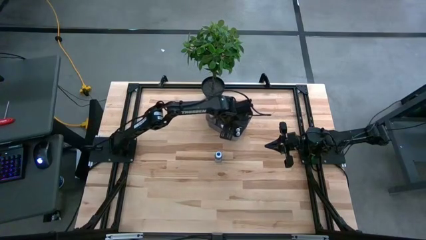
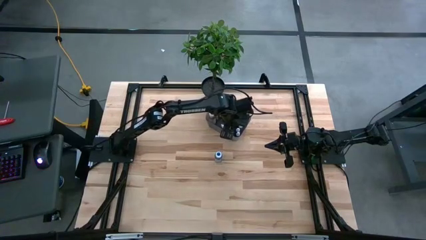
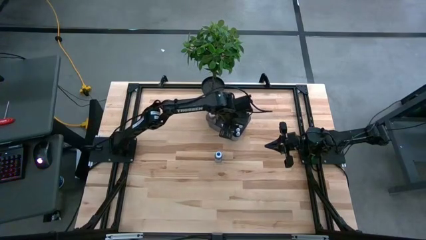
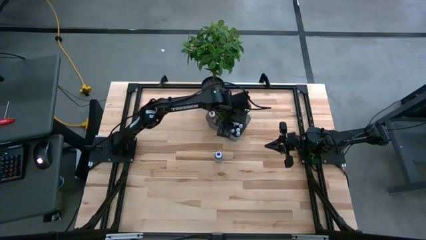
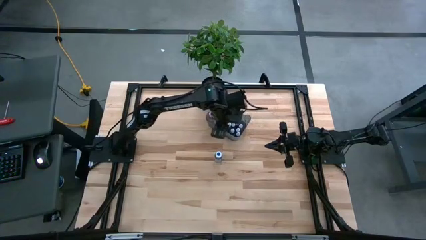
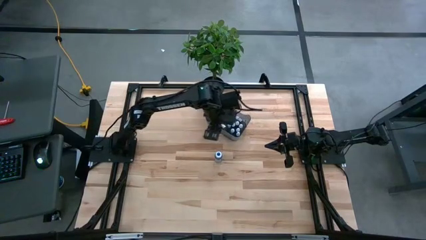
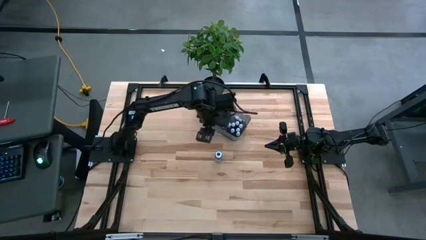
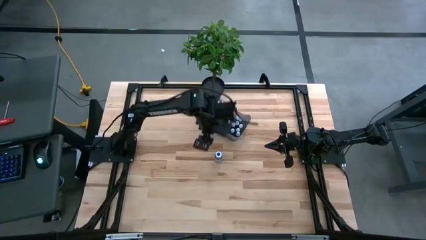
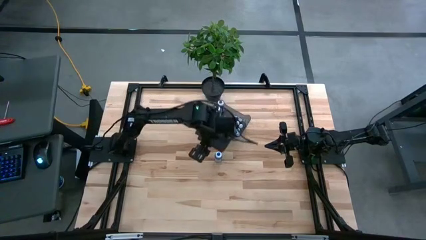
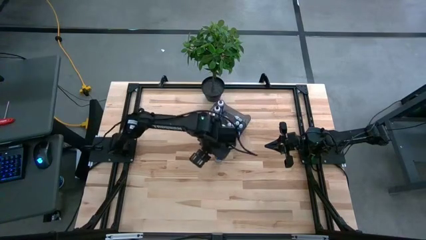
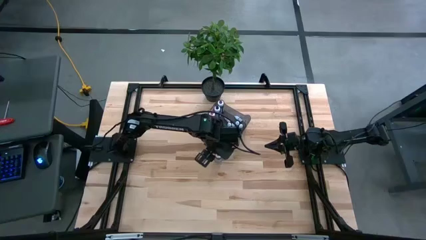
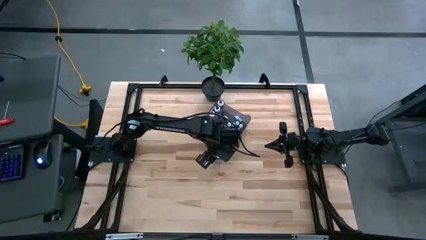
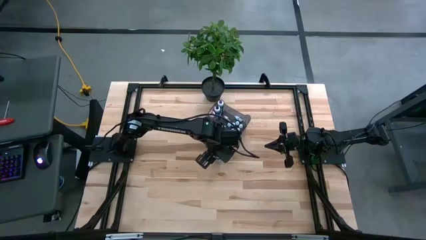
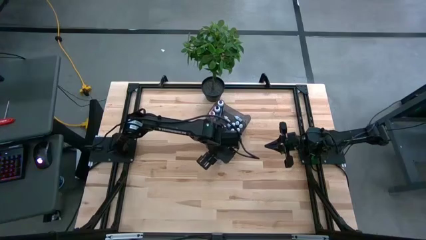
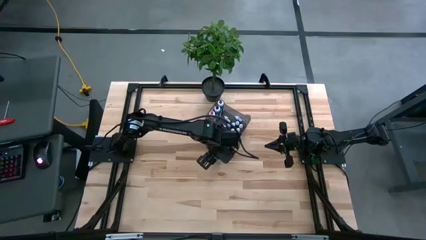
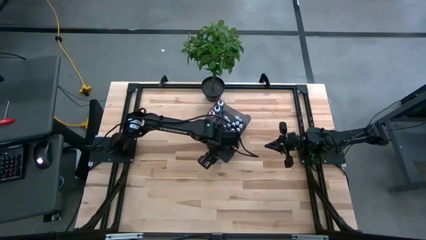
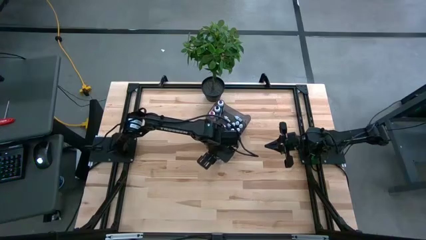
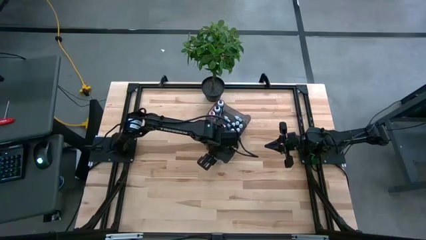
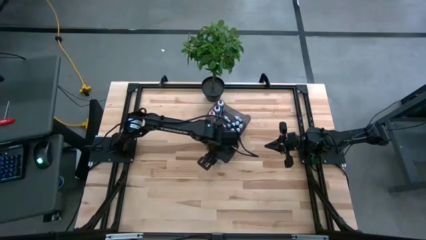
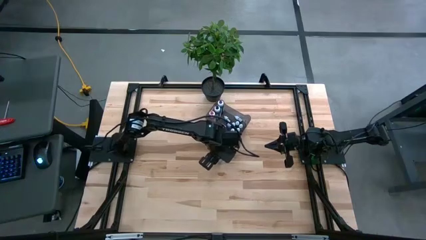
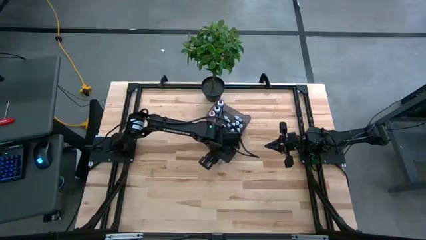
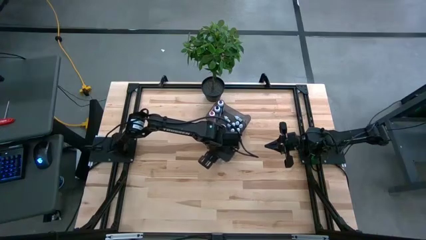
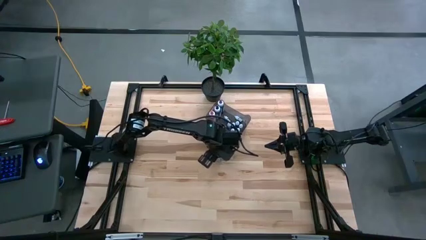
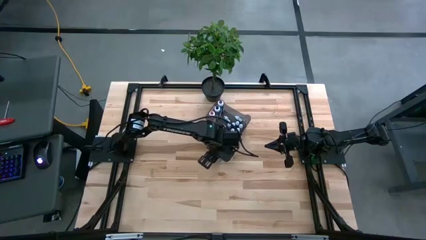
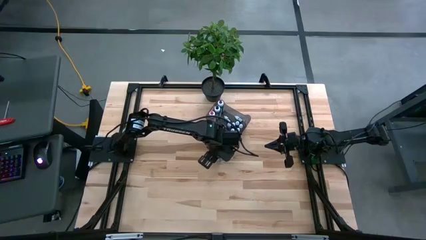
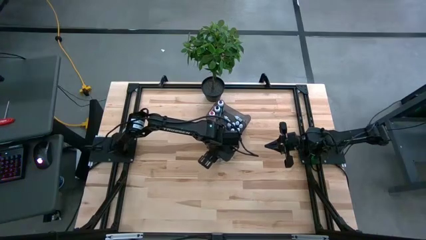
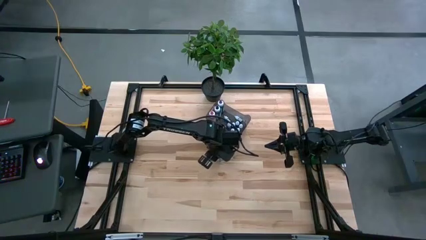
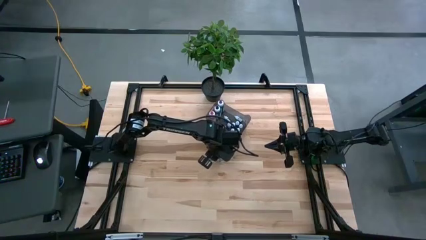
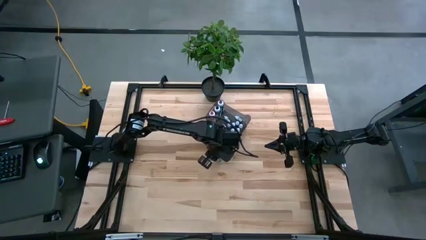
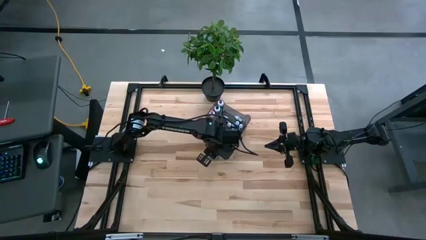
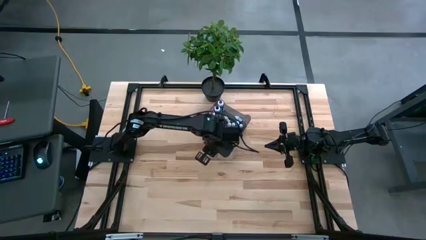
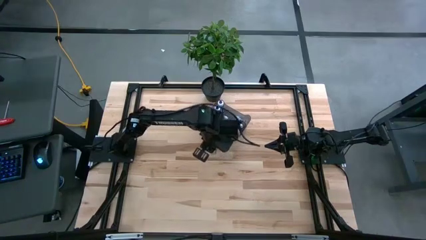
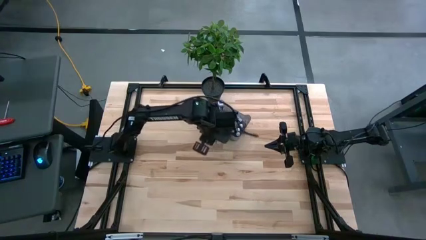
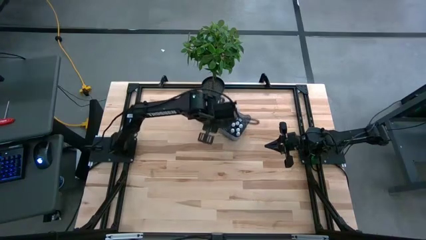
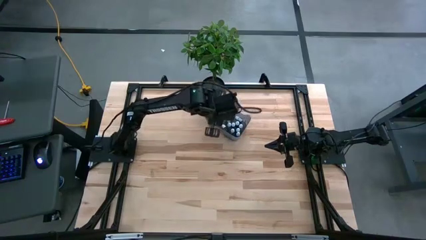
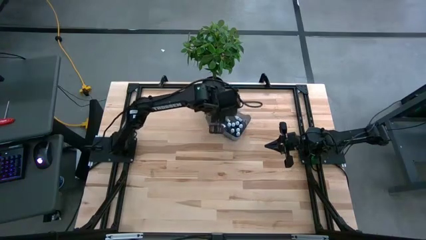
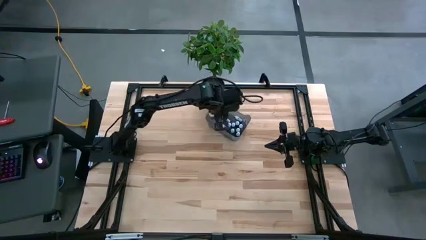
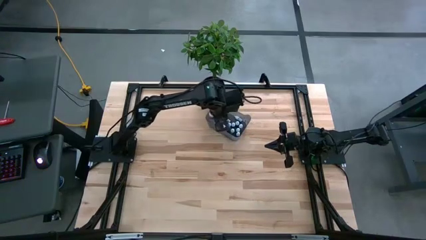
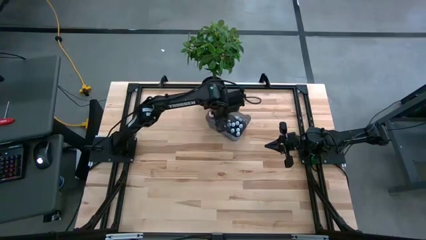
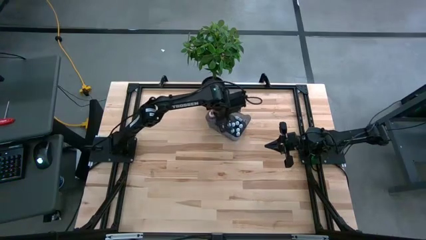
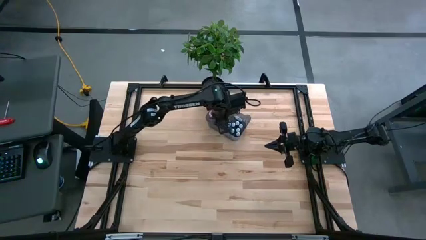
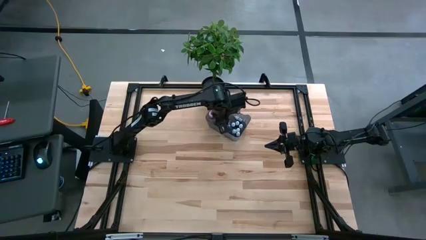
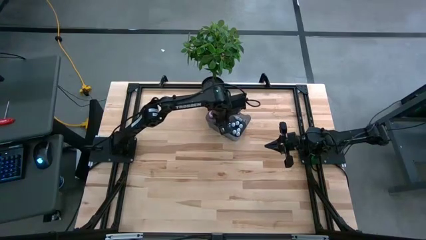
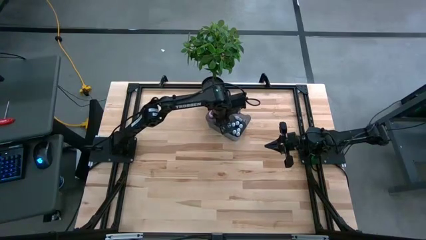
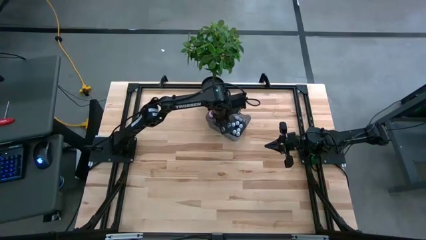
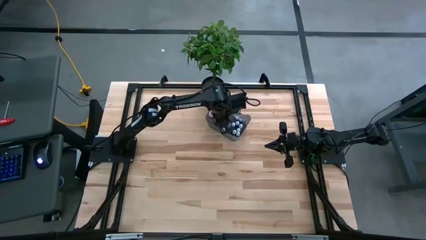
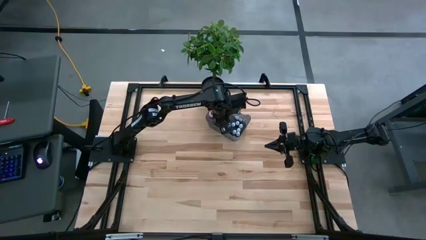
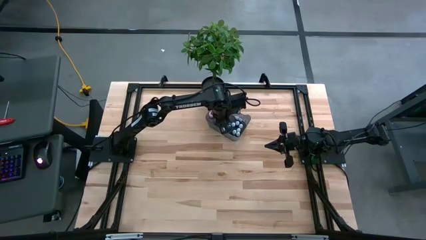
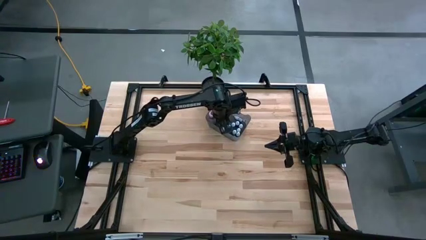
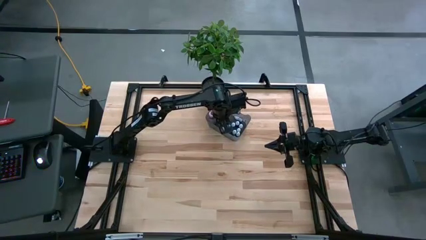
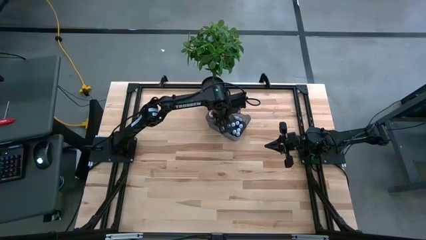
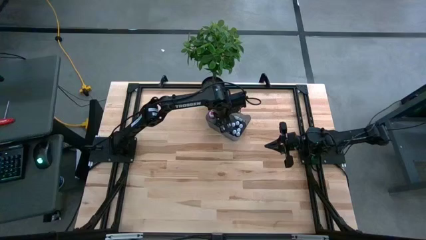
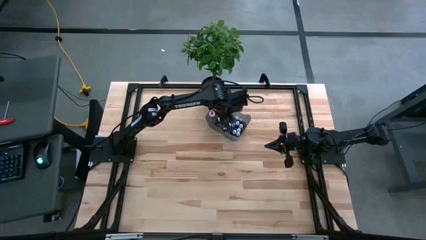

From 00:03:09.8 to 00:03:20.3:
Task: Pick & Place food coloring
Put the big blue food coloring bottle into the black bin

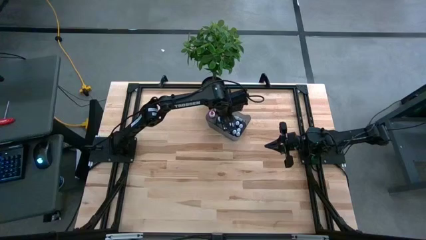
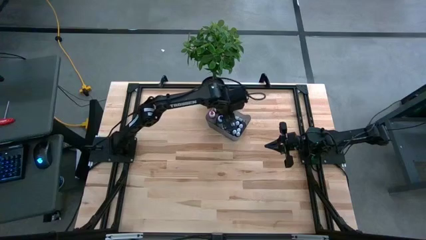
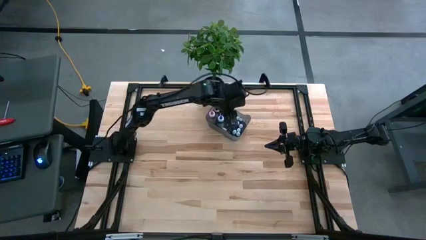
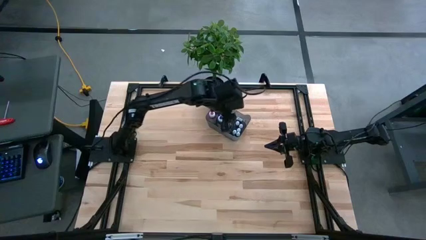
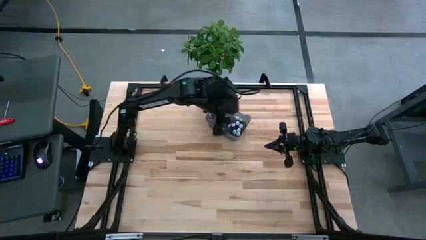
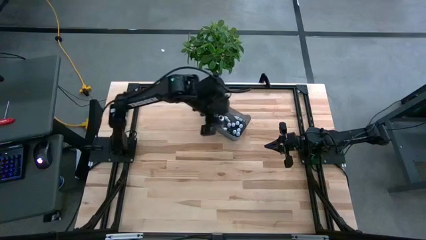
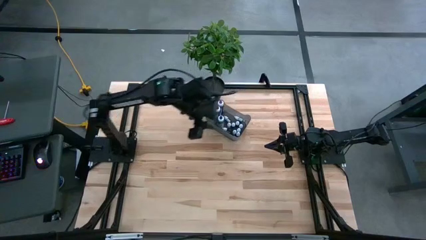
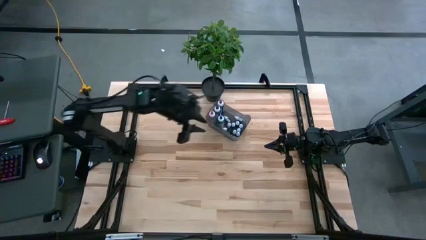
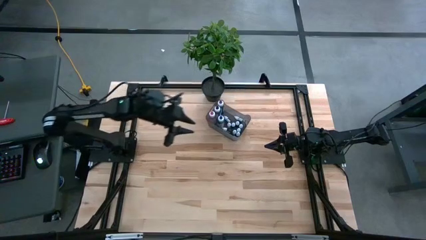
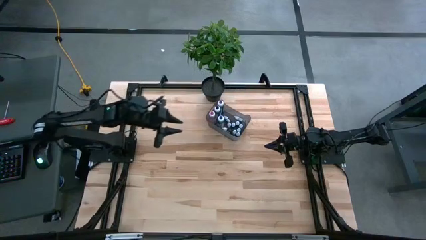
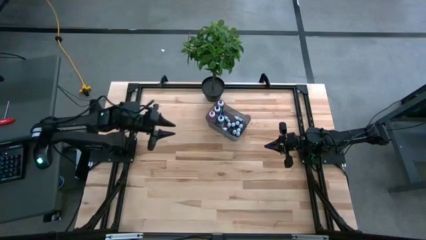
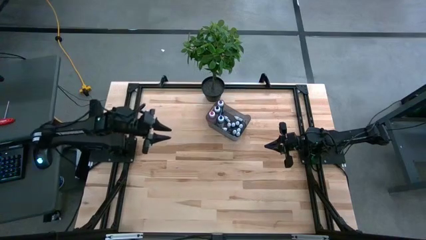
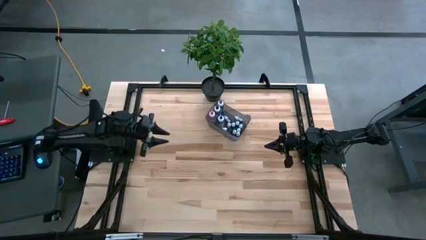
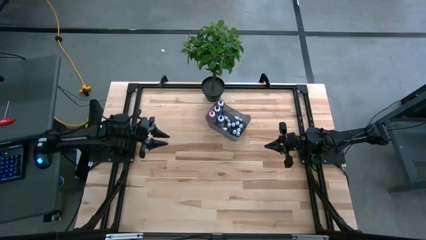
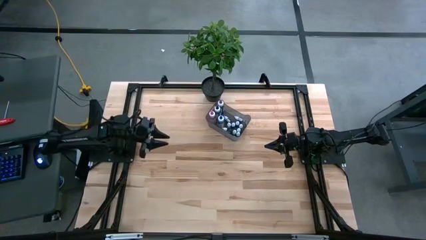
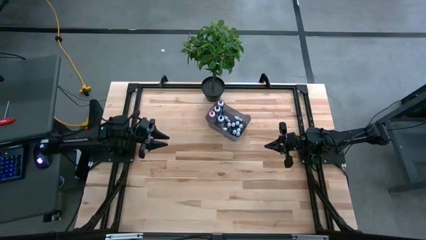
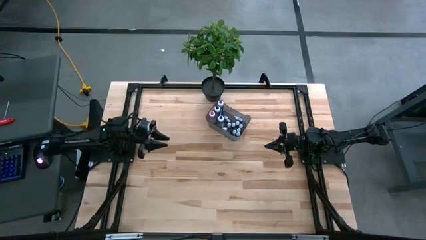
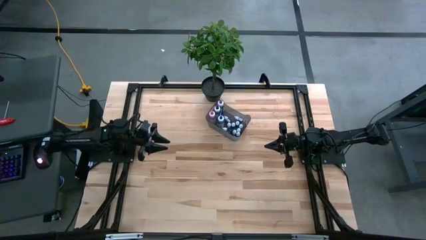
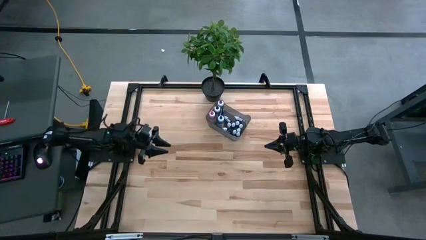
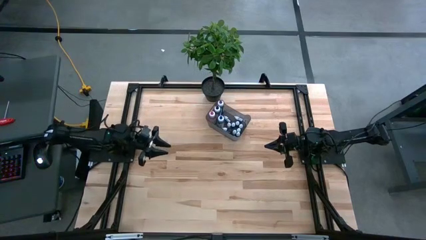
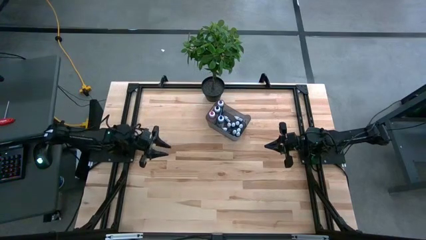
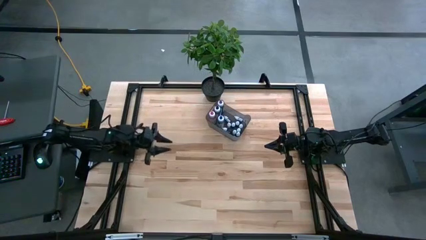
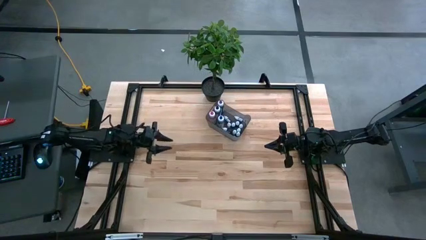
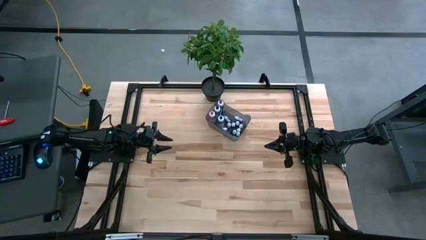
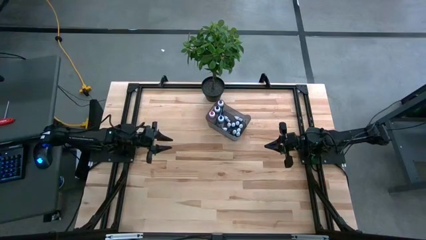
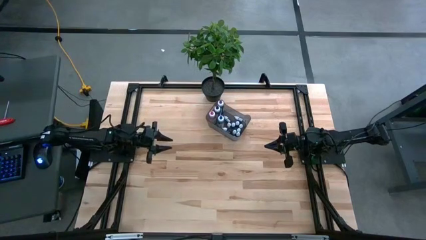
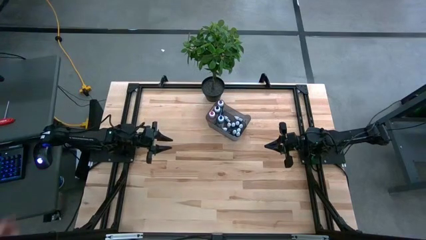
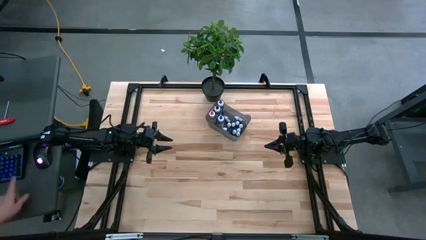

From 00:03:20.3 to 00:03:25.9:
Return to Home Position

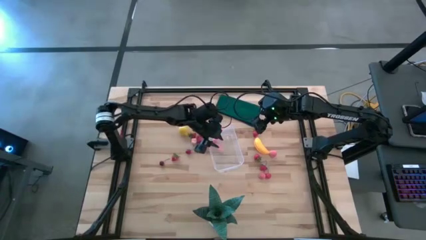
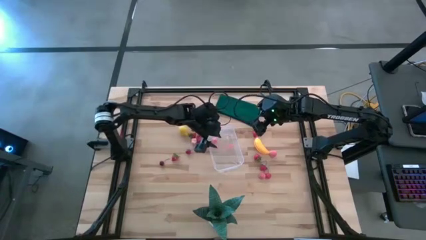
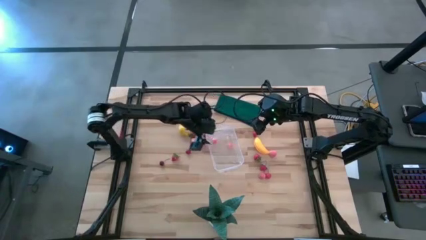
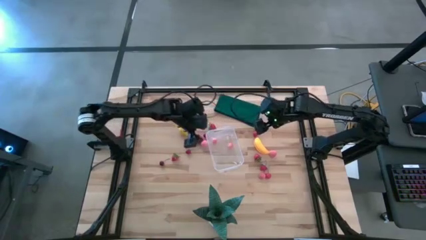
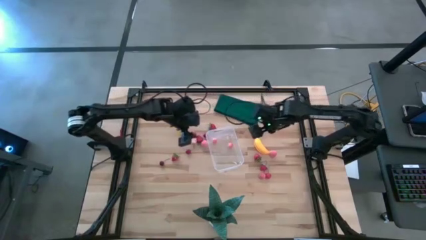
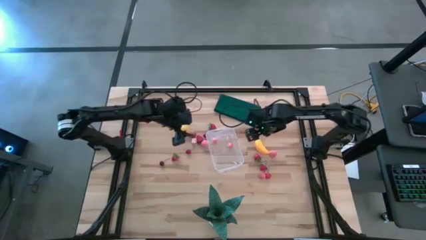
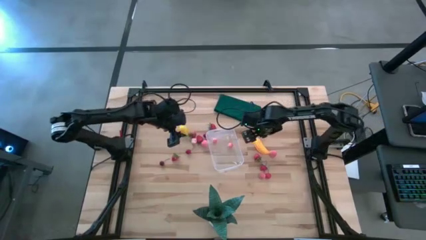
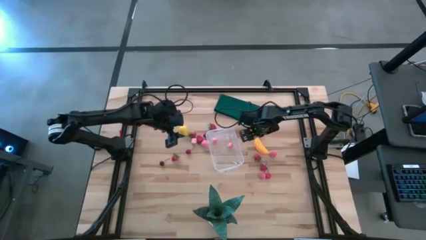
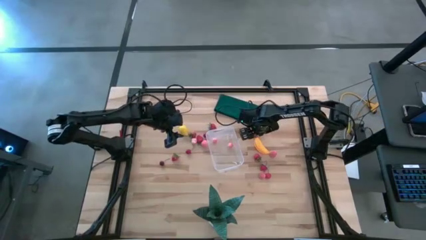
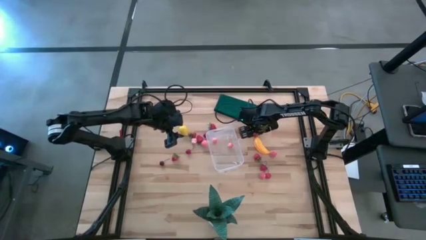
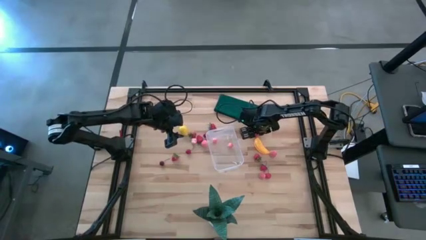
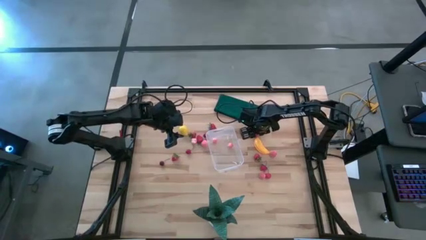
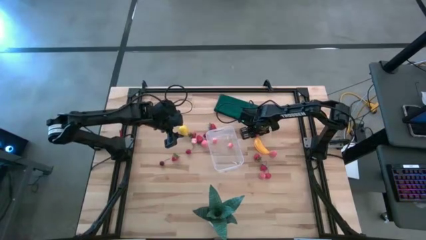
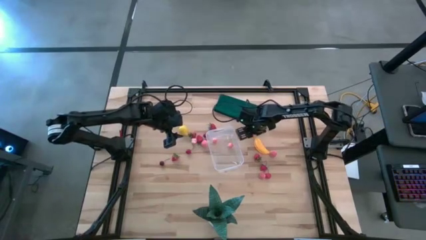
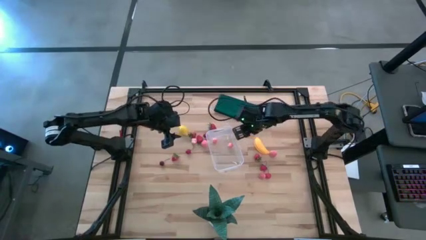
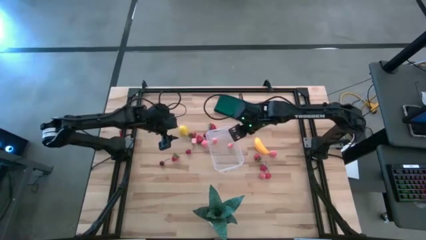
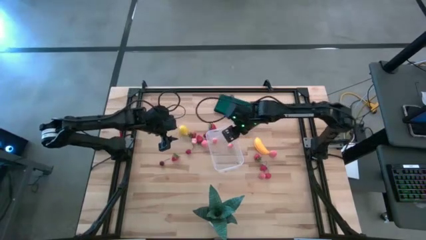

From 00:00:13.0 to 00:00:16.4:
Task: Pick and placing Produce into tupperware
Put the strawberry into the transparent bin
